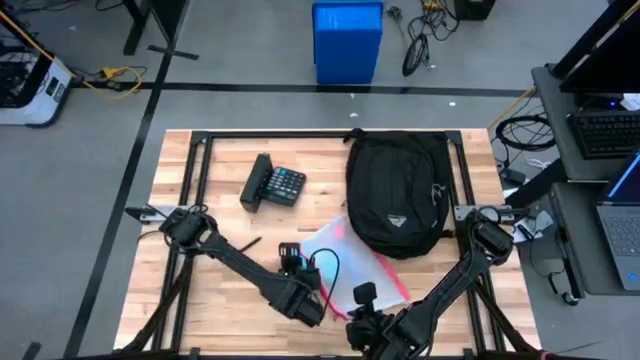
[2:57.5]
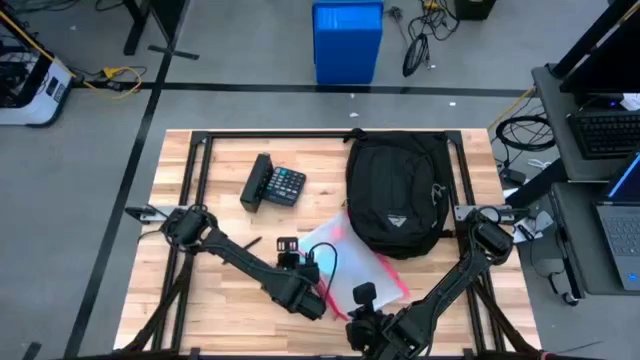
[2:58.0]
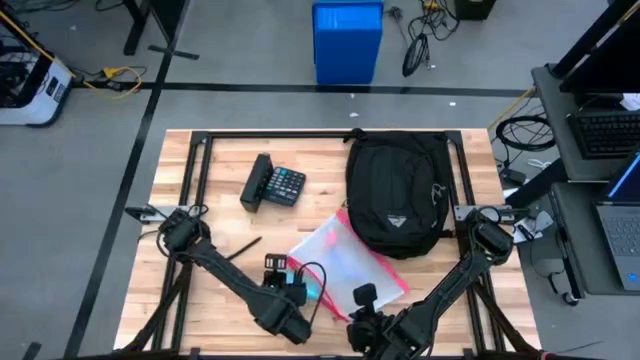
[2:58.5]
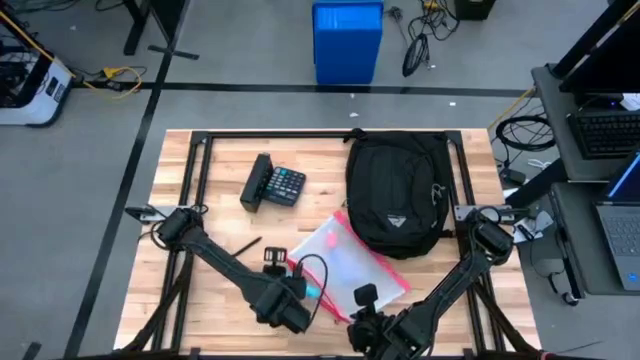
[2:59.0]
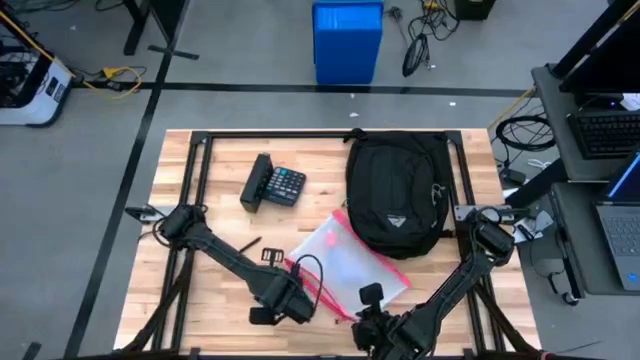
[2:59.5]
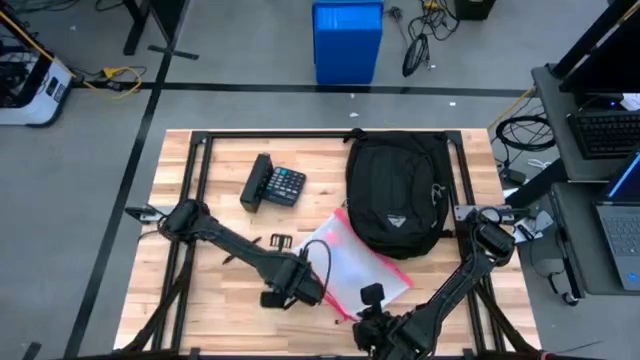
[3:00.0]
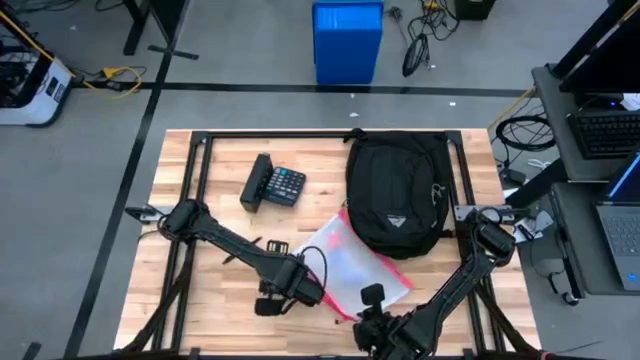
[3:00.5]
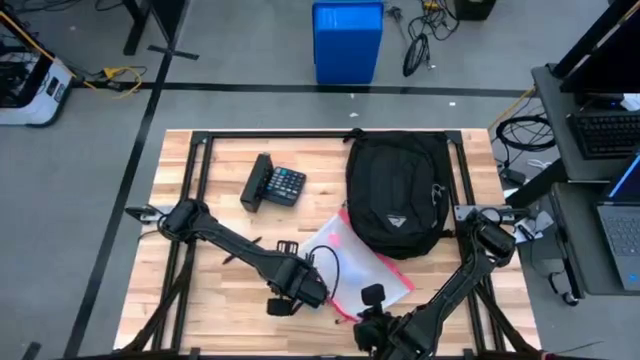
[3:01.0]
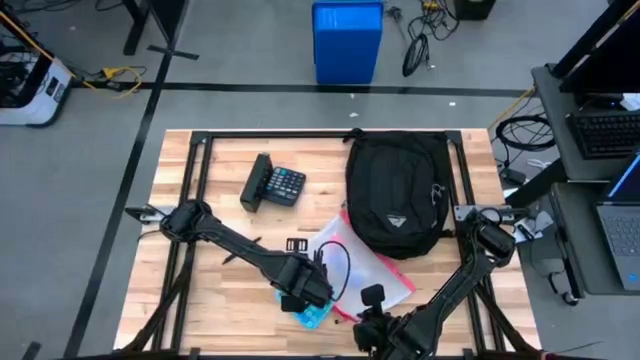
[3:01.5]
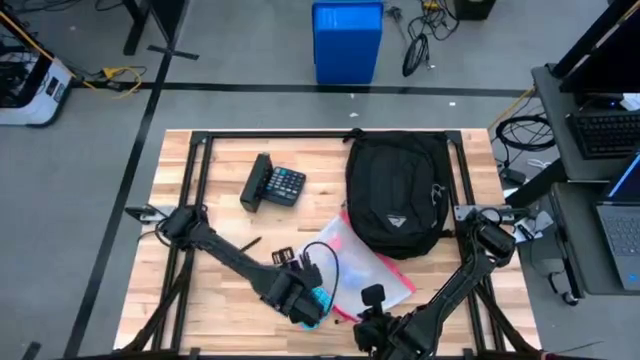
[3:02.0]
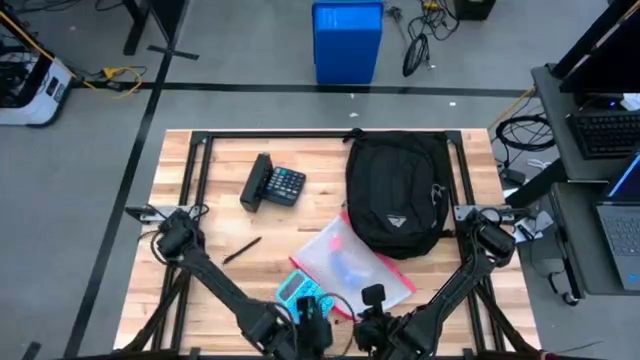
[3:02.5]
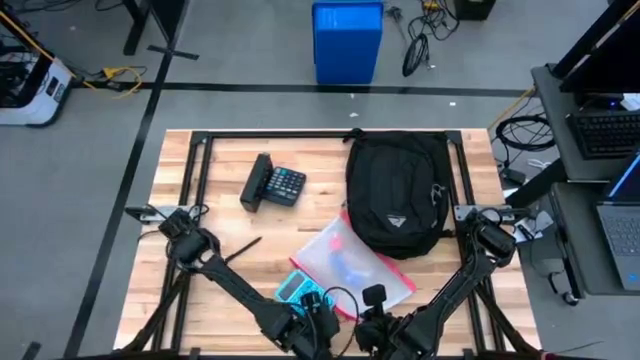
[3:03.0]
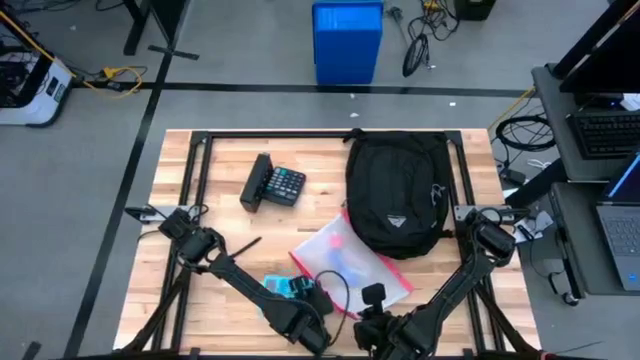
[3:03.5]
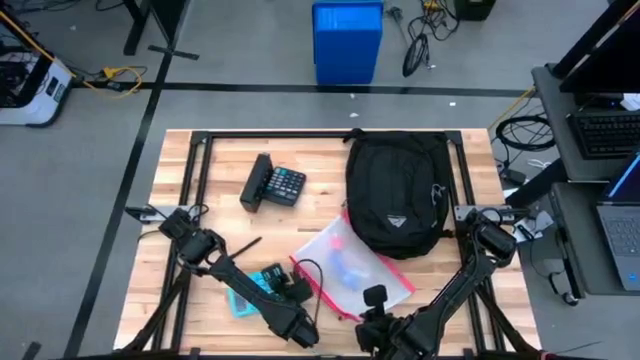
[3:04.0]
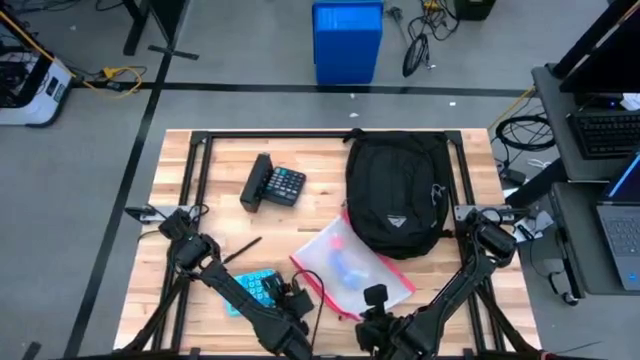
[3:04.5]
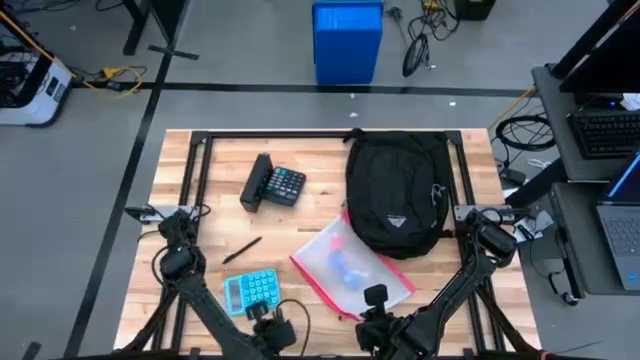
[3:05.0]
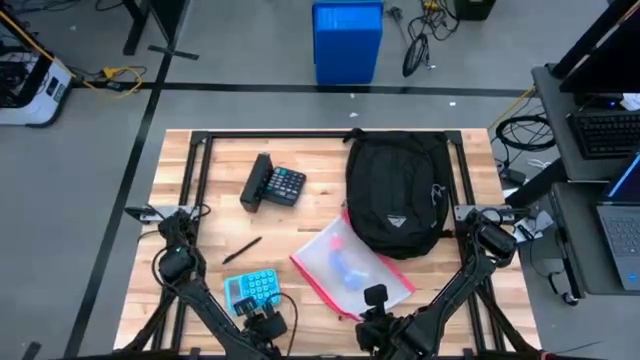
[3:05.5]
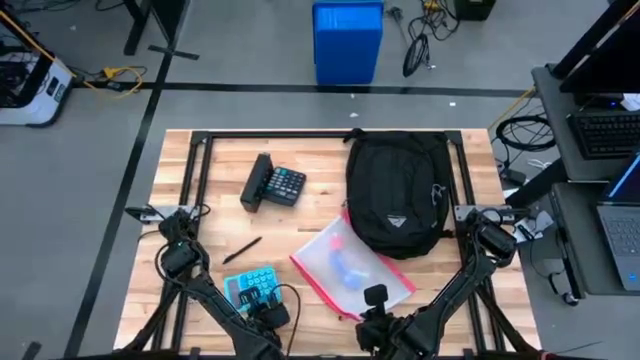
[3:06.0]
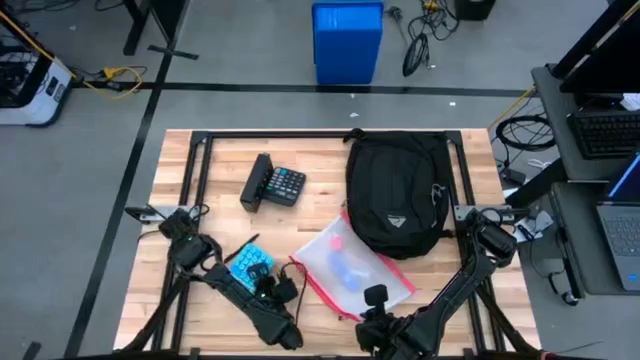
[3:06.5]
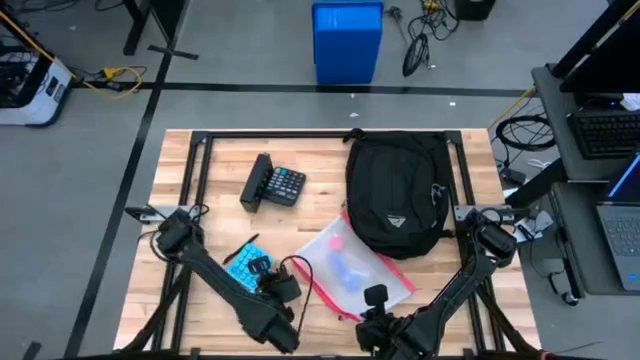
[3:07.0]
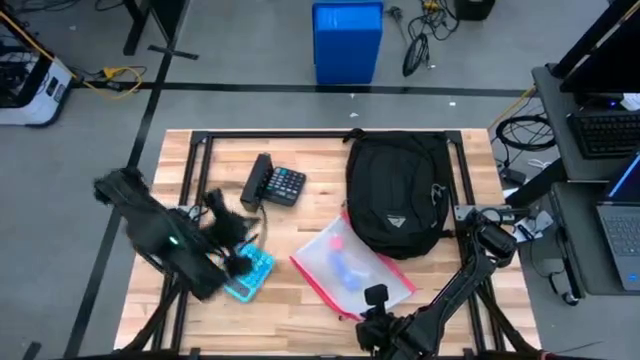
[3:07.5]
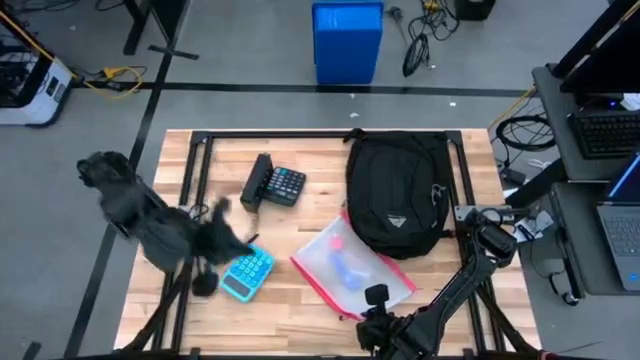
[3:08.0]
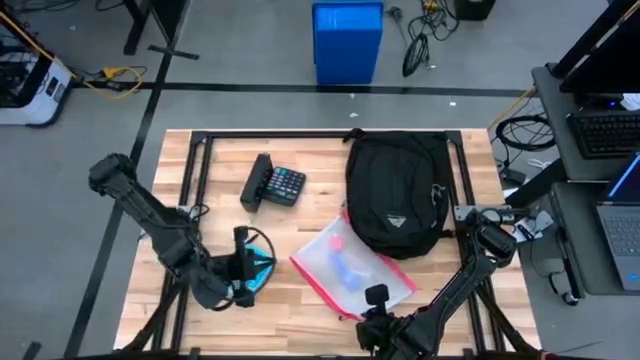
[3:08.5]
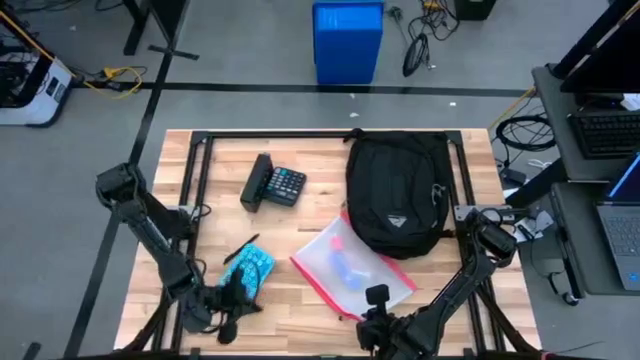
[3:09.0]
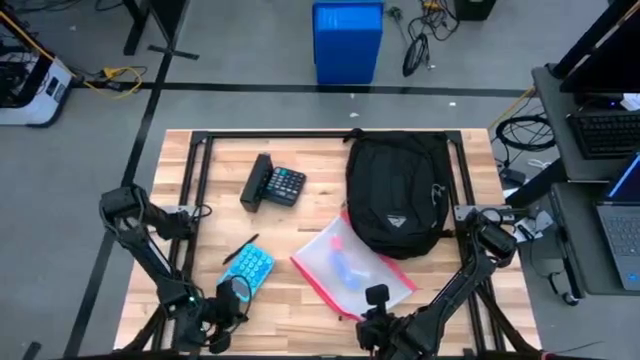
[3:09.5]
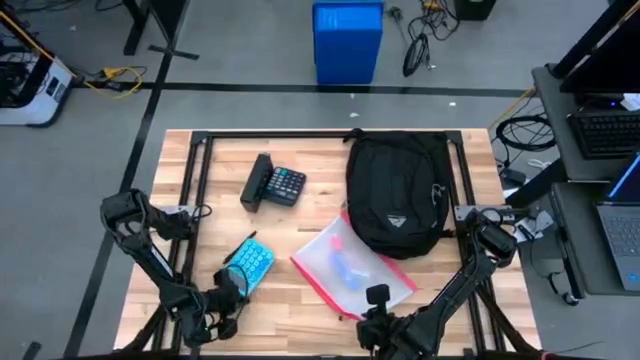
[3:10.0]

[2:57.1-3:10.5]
Task: Unpack backpack
Remove the blue calculator from the white zip bag

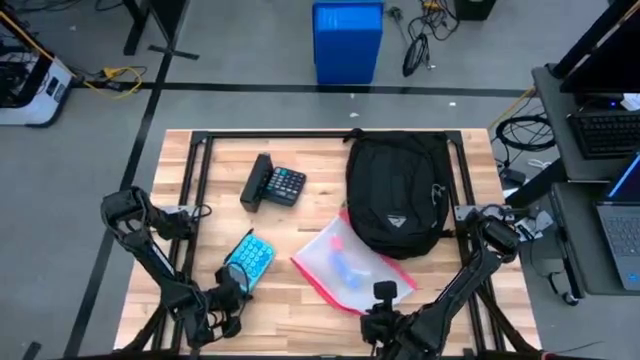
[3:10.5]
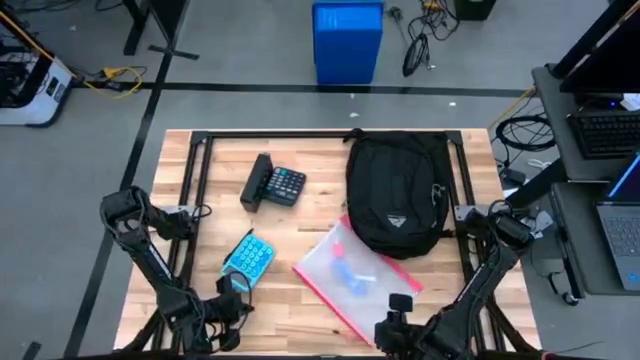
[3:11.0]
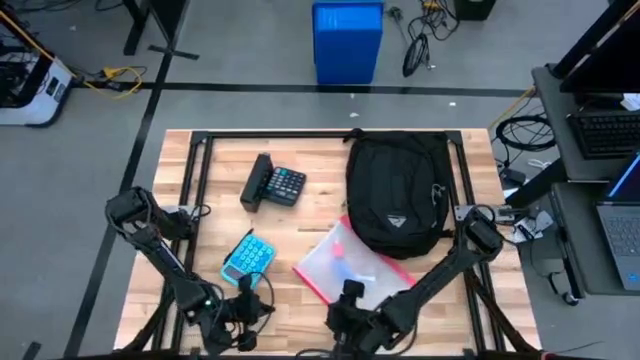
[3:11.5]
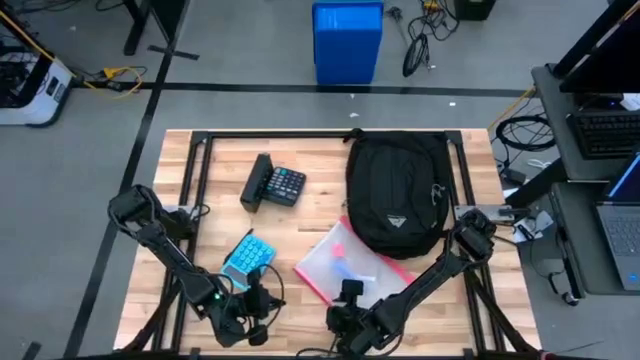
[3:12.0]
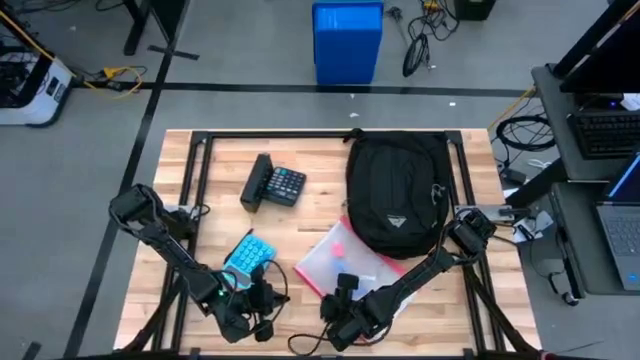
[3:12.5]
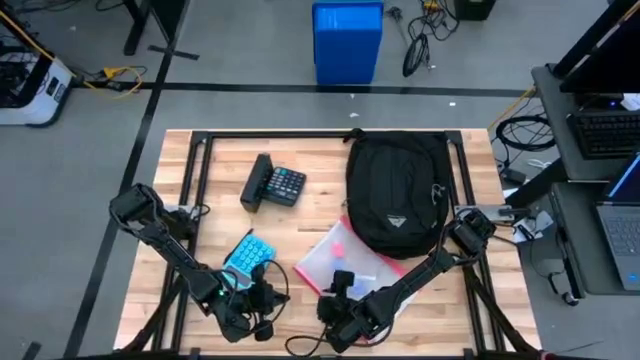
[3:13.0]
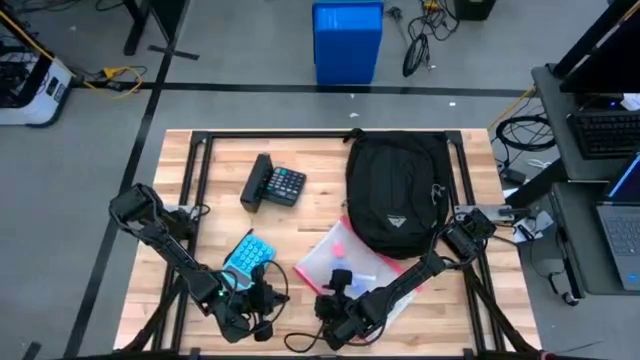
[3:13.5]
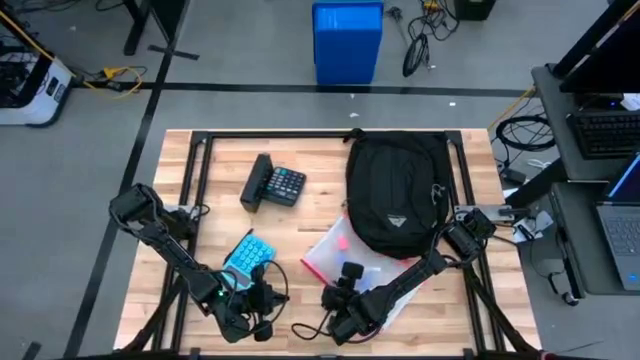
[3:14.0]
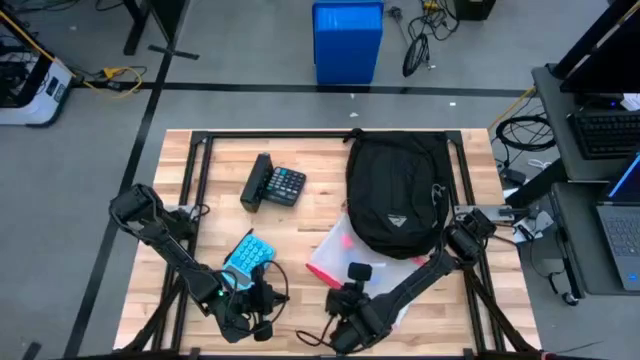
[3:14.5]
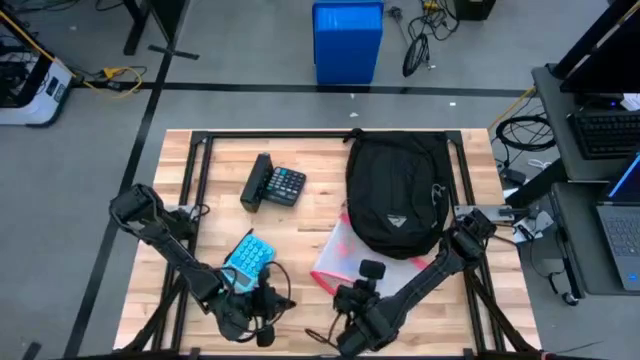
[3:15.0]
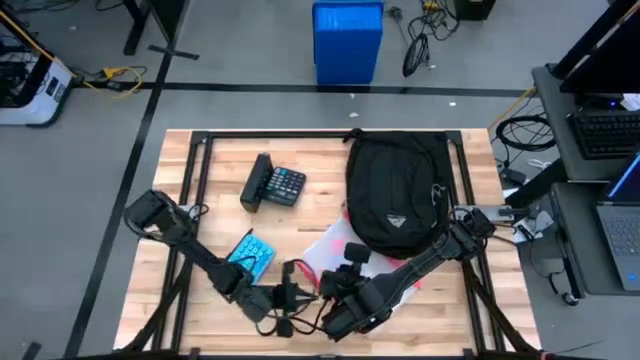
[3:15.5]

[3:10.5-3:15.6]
Remove the violet chocolate bar from the white zip bag

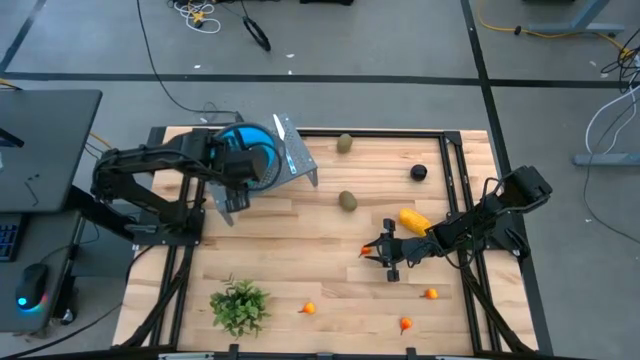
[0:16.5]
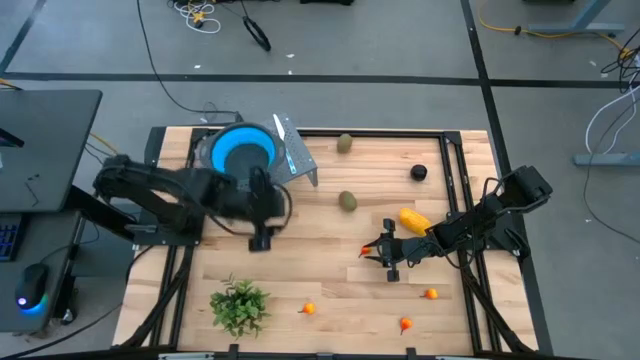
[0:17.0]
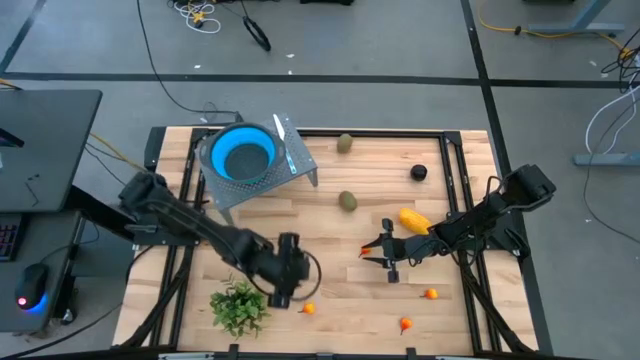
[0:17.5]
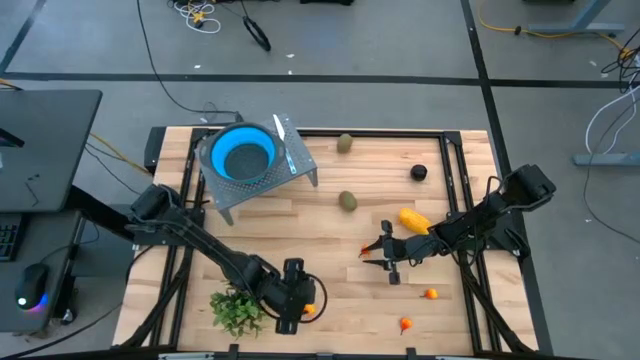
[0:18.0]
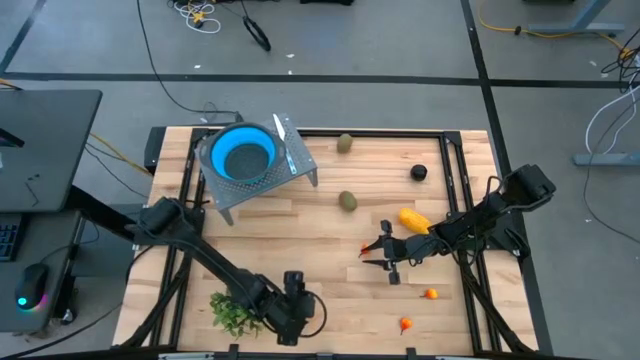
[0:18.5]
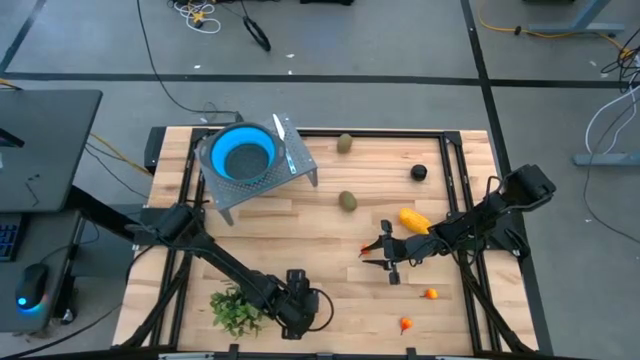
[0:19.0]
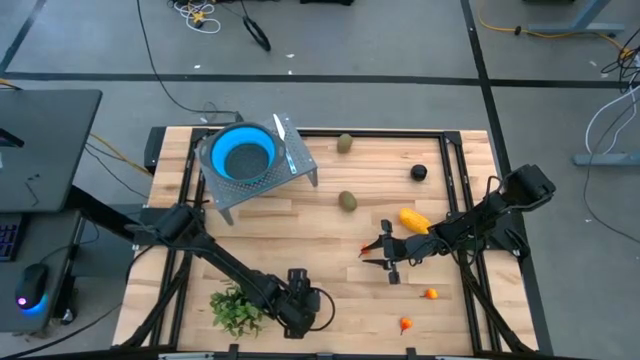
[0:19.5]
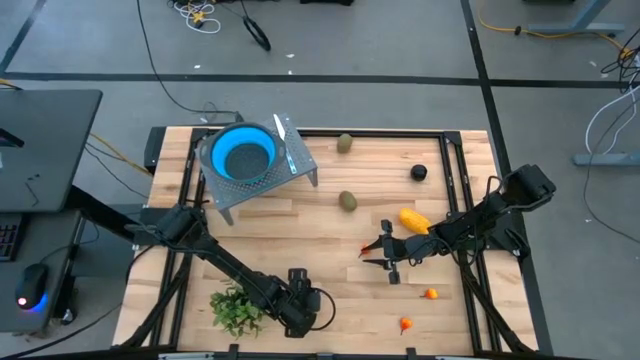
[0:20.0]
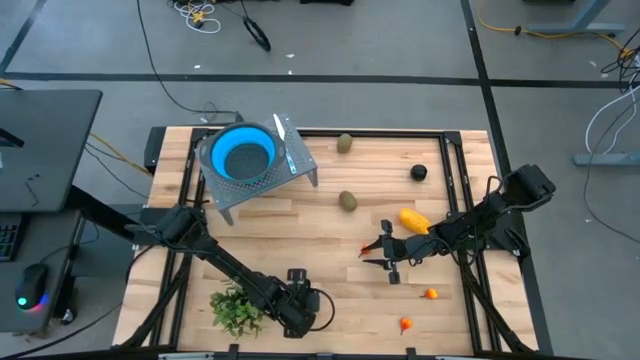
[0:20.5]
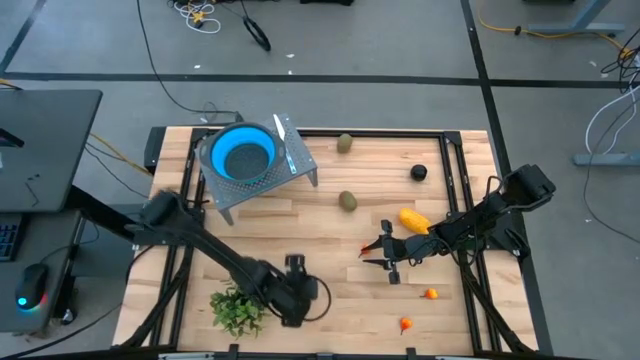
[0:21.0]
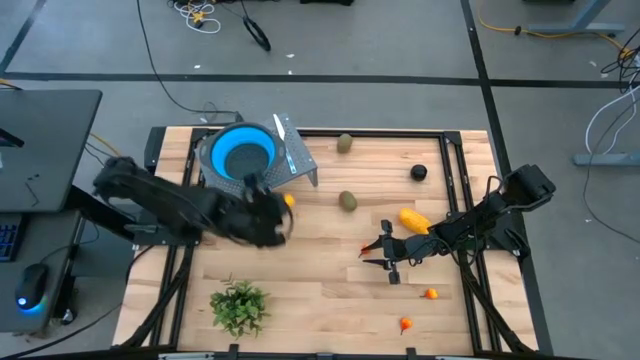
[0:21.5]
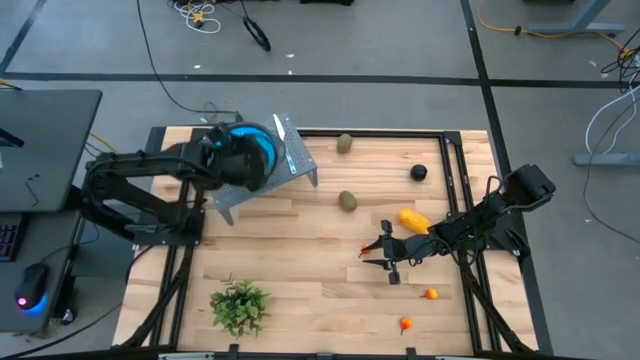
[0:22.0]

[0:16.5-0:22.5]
Task: Pick & Place Fruit
Put the left orange pear into the blue strainer bowl on the shelf
